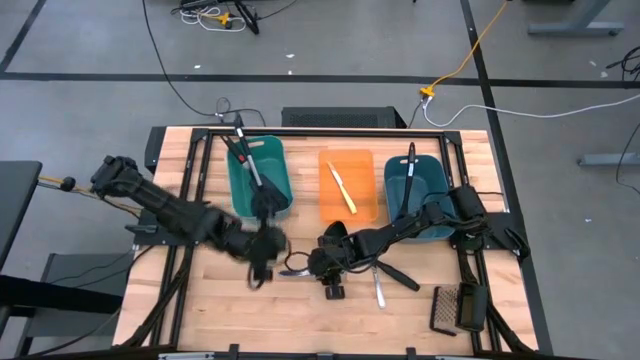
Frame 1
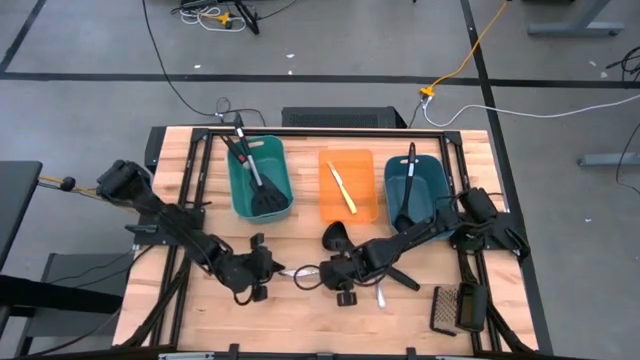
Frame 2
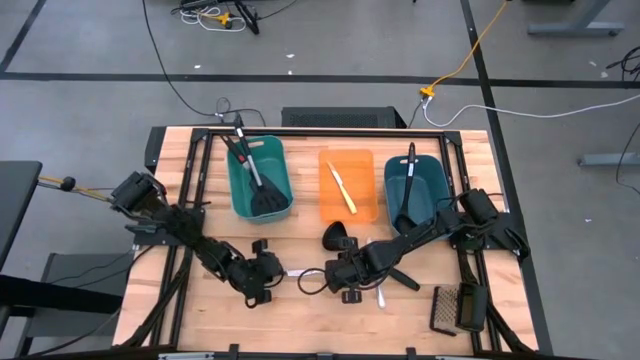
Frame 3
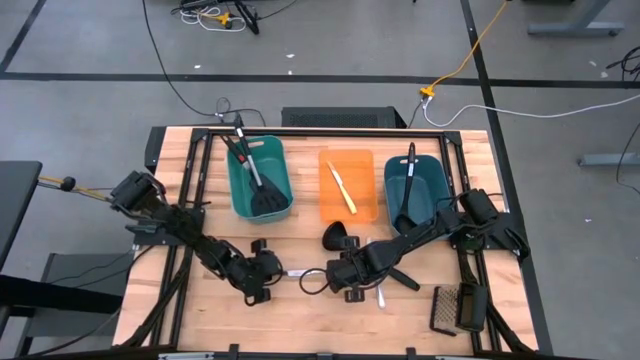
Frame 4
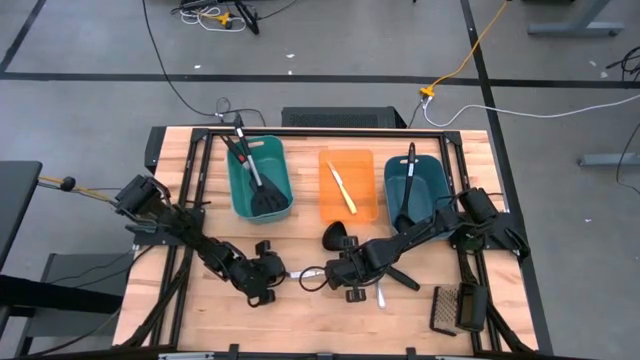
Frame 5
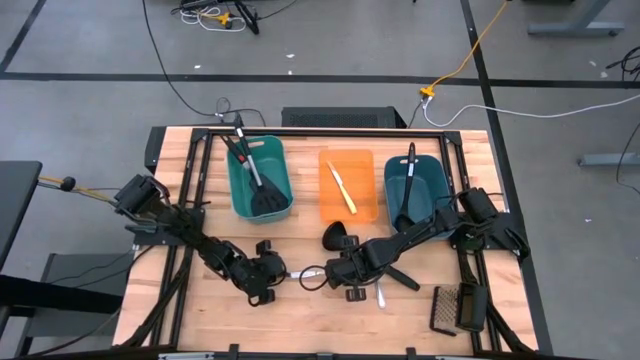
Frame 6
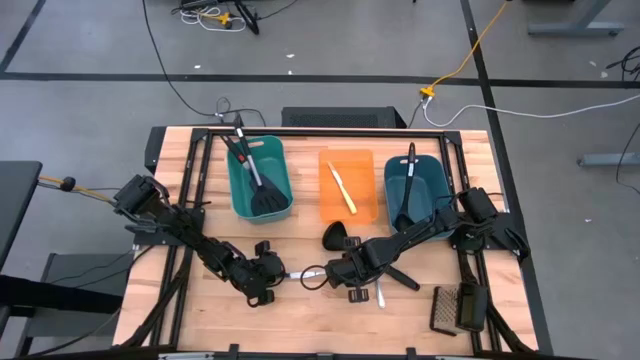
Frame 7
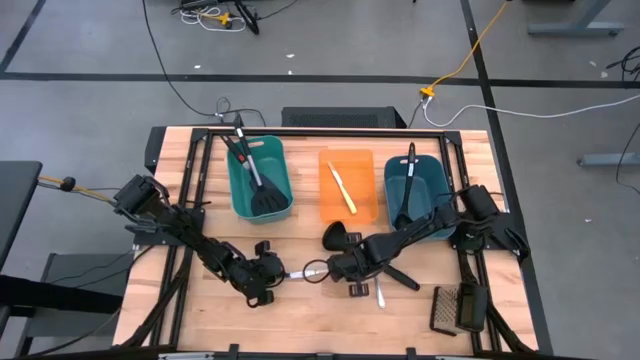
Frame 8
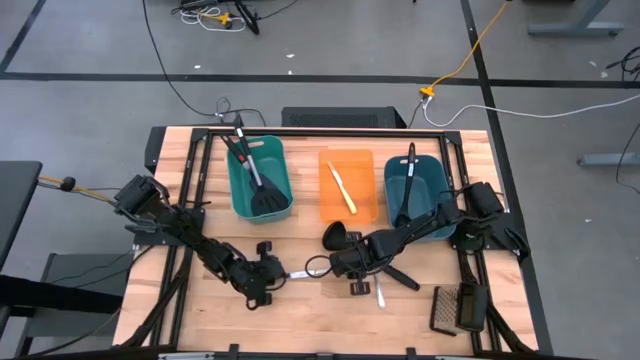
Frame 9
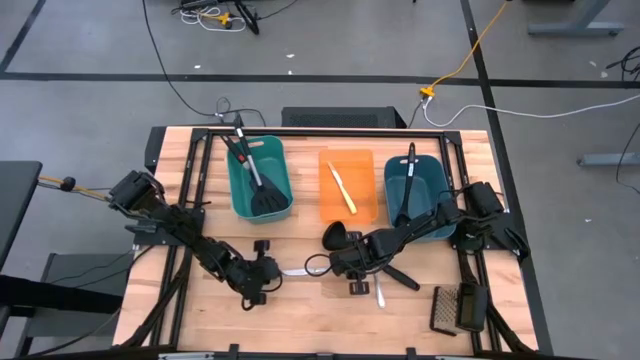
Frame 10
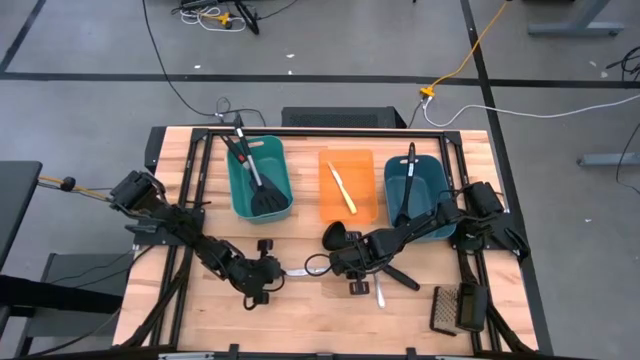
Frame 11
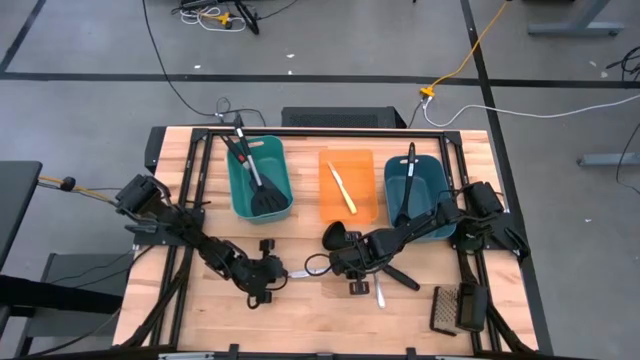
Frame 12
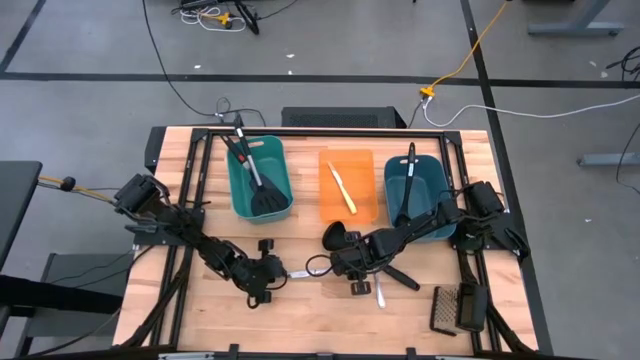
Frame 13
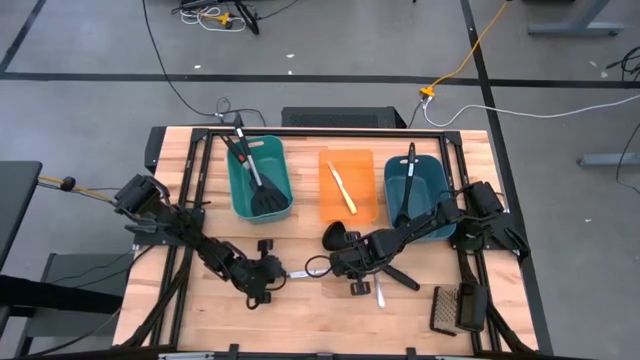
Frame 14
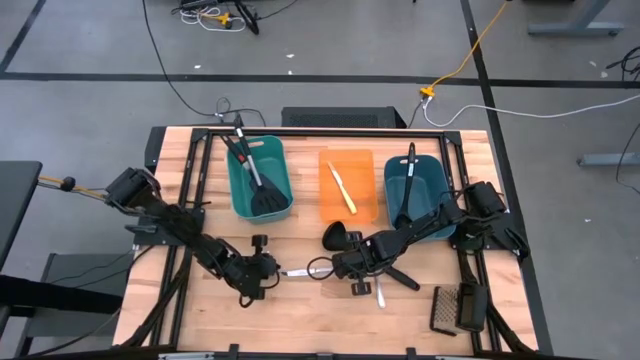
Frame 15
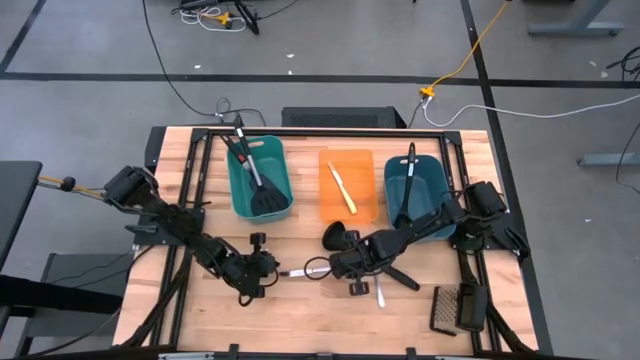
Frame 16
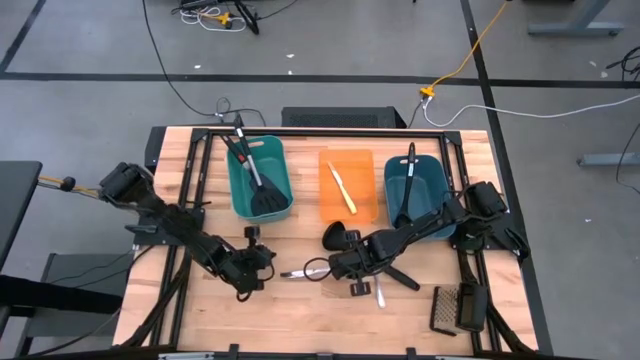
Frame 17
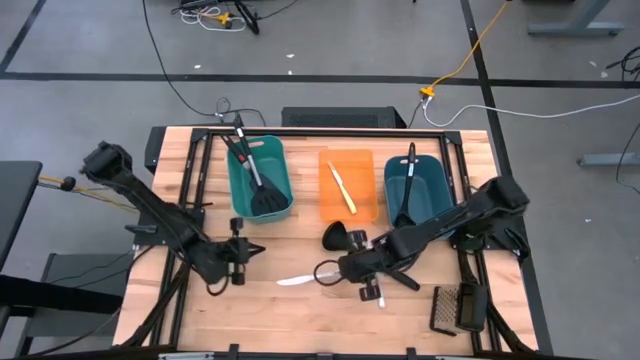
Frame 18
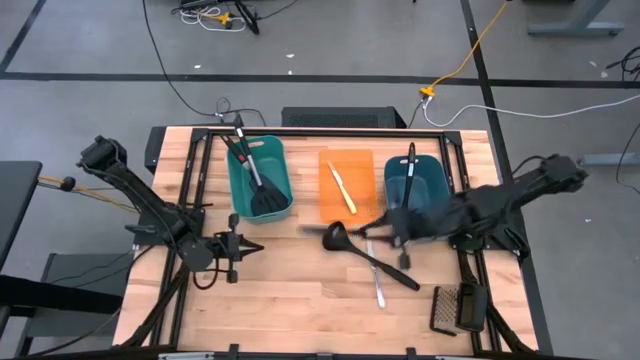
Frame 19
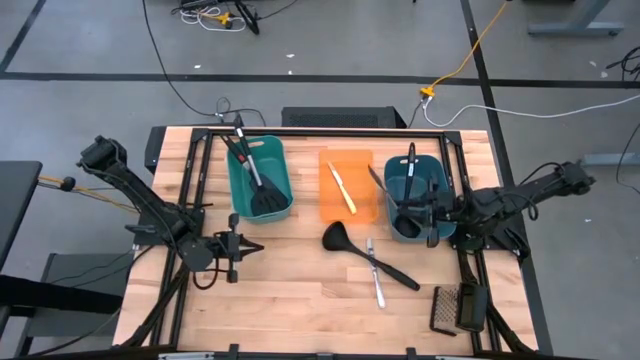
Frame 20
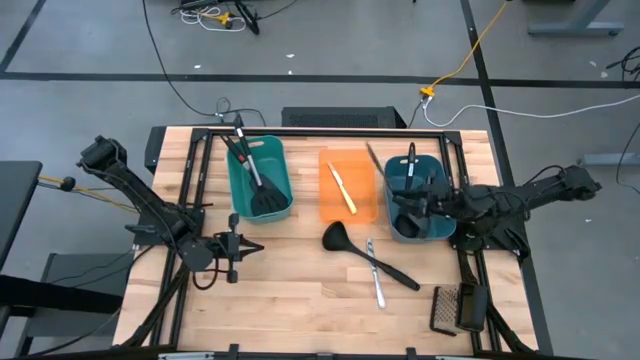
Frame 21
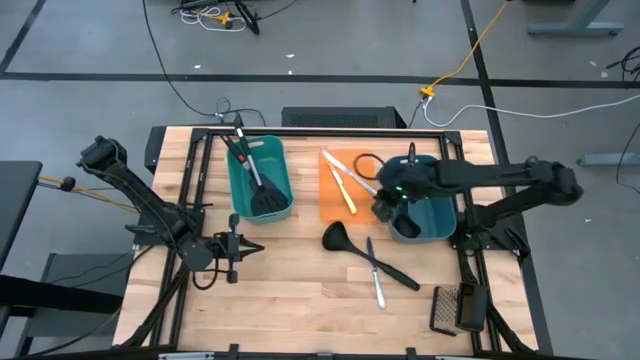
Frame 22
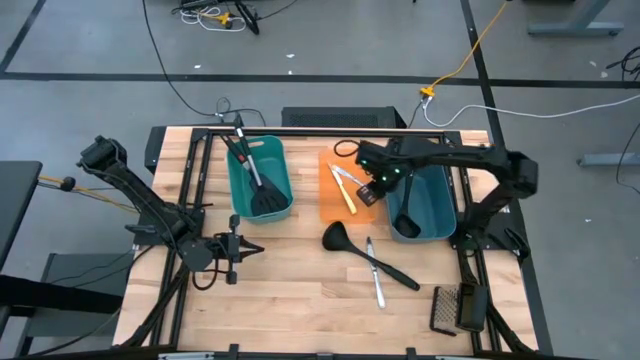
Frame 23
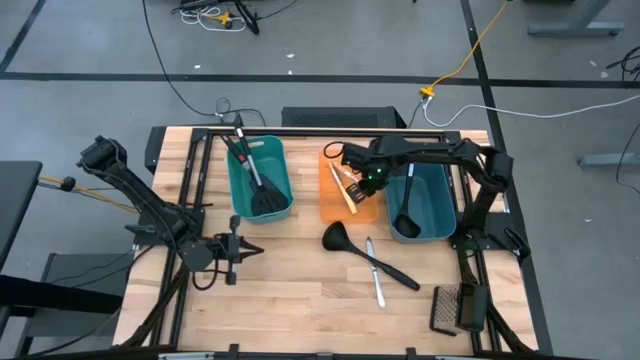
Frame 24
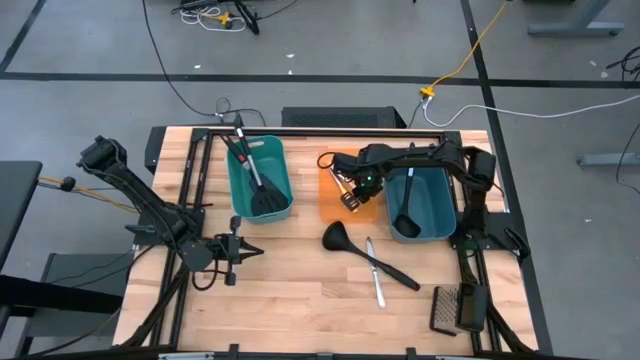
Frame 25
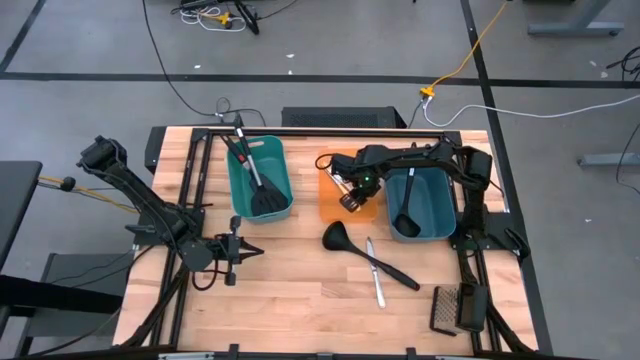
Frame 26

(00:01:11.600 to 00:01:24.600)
Task: Pick & Place Kitchen Items
Put the left silver table knife into the orange bin

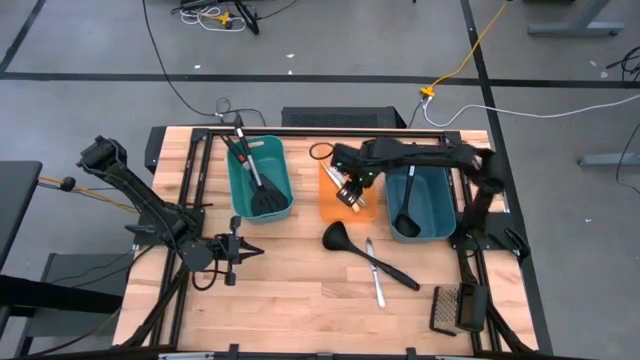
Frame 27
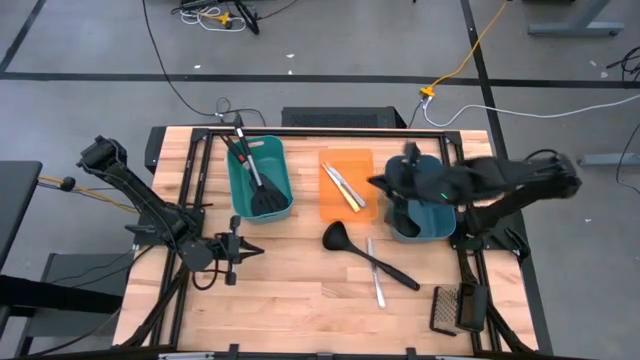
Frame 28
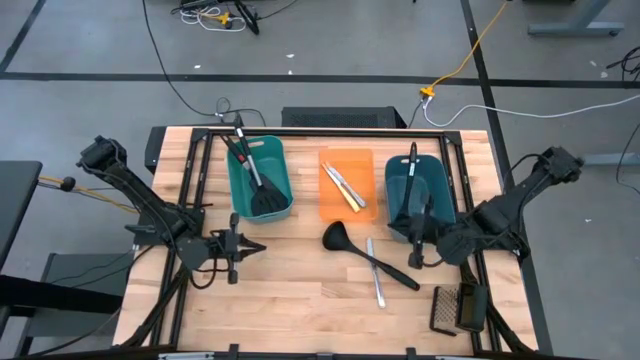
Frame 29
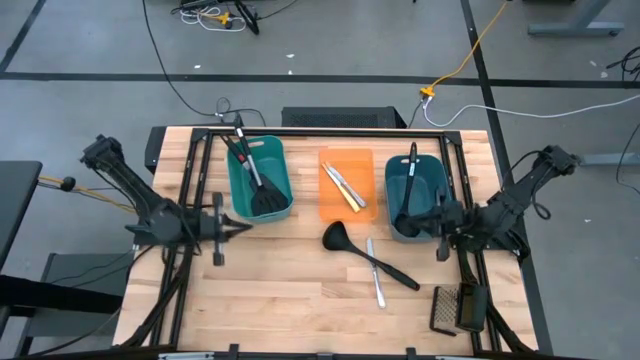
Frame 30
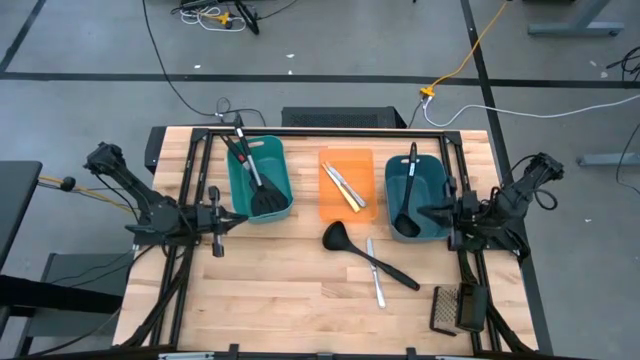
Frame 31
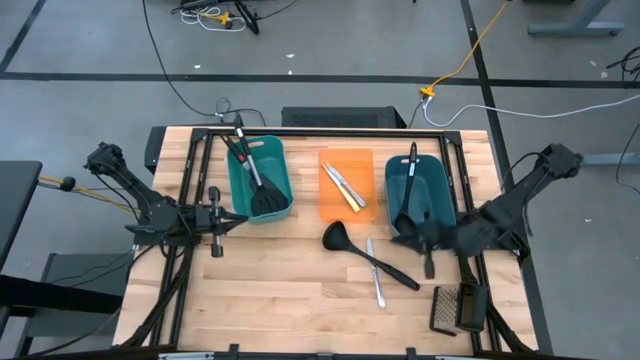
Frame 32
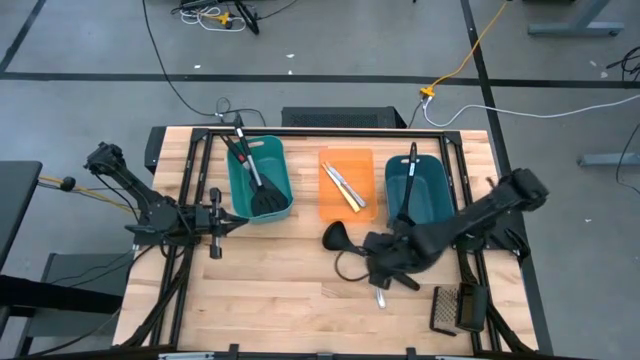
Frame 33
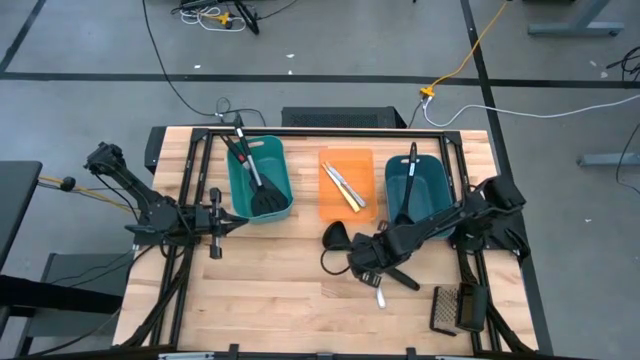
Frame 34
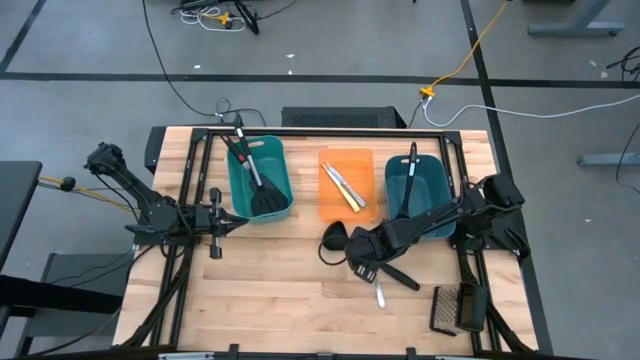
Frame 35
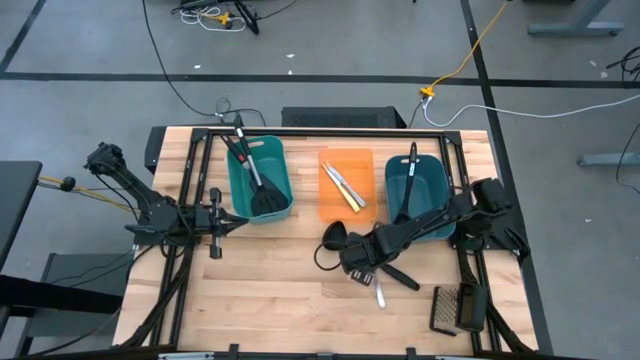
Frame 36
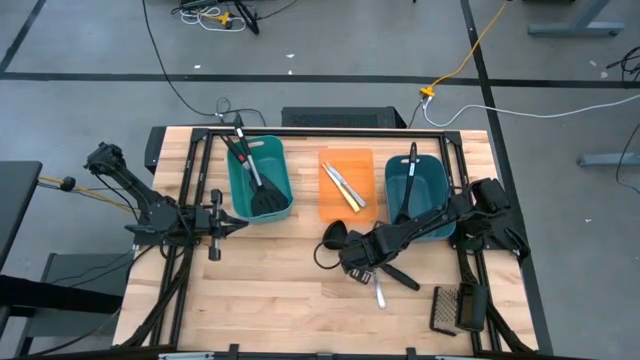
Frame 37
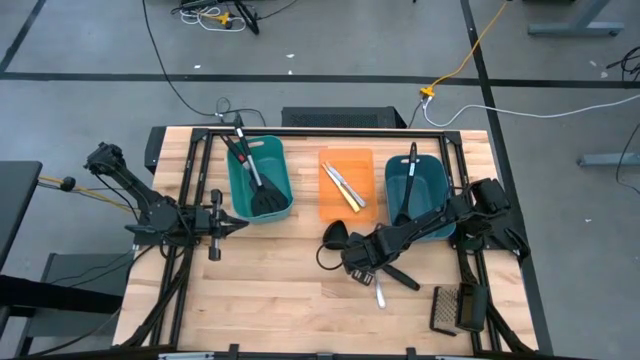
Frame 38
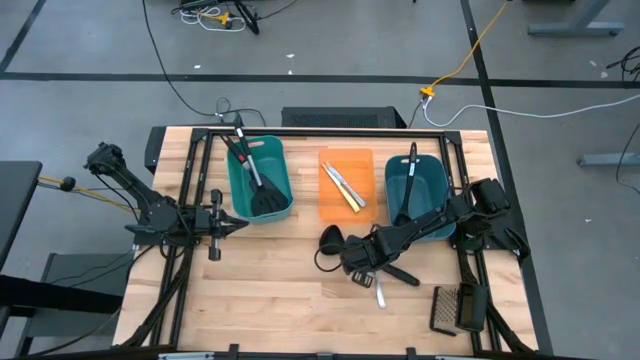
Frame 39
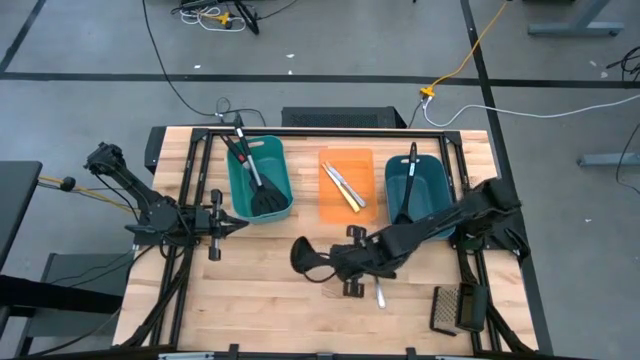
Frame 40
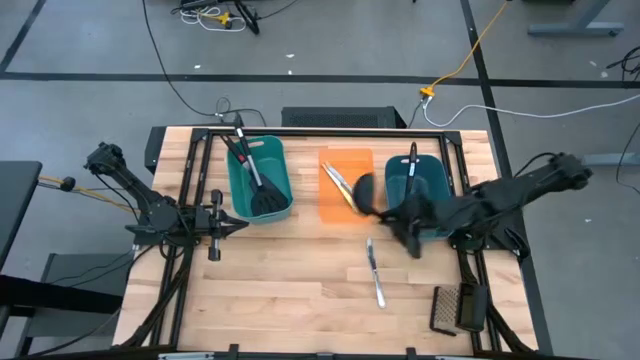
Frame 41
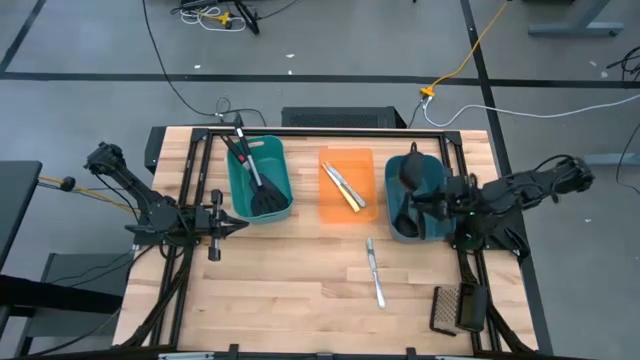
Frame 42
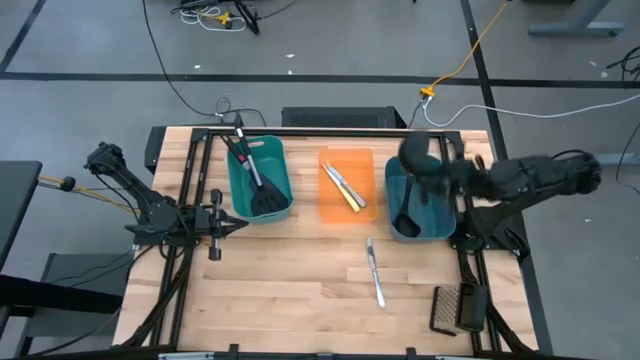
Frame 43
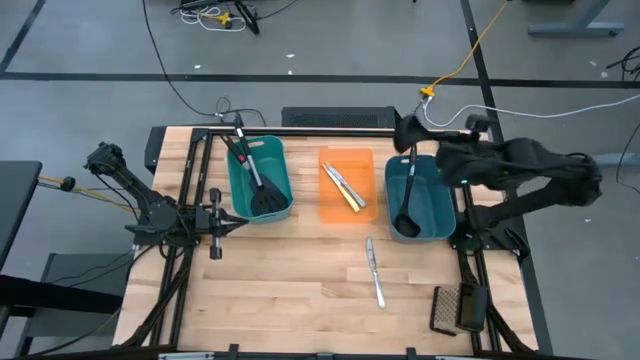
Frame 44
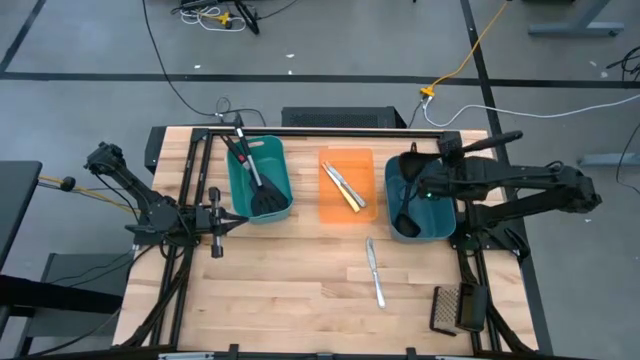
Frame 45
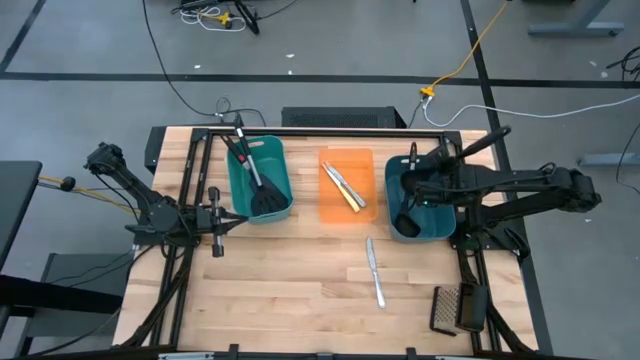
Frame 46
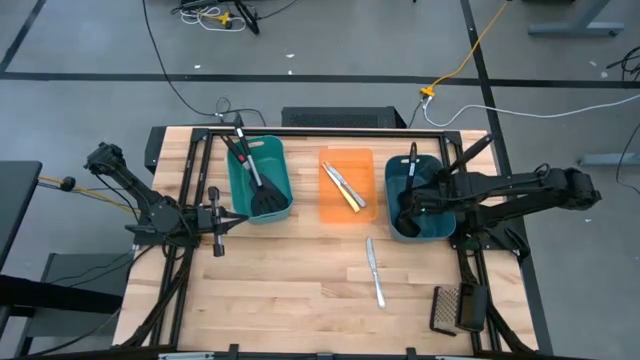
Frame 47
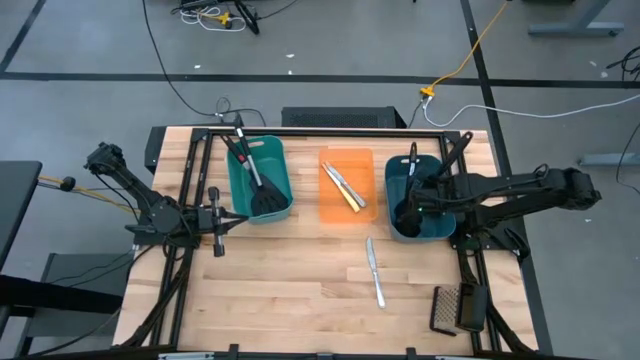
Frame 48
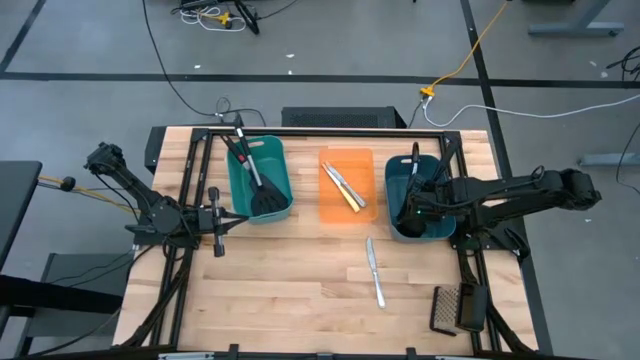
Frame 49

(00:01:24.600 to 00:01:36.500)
Put the black serving spoon into the blue bin
